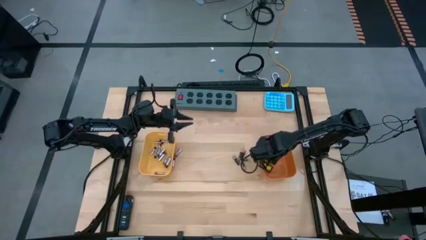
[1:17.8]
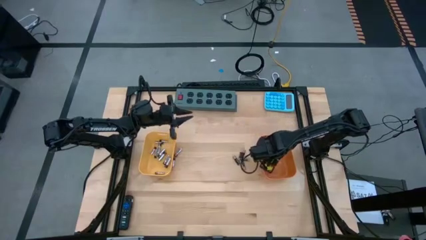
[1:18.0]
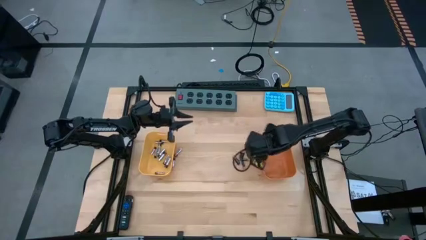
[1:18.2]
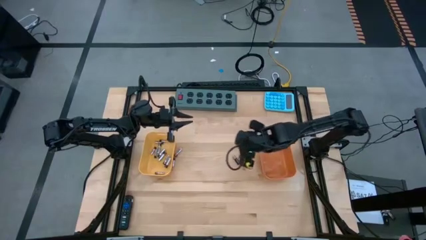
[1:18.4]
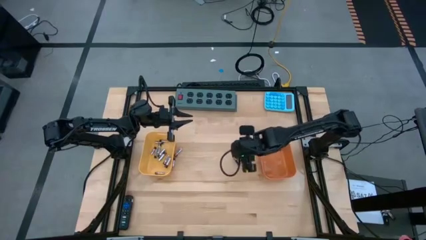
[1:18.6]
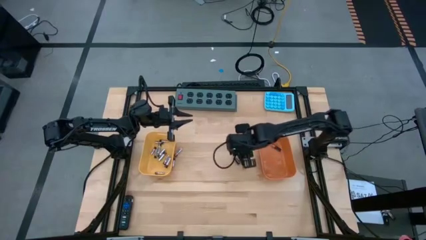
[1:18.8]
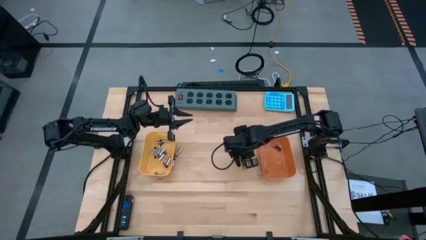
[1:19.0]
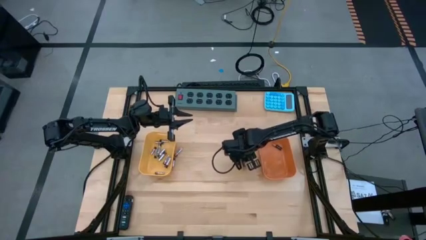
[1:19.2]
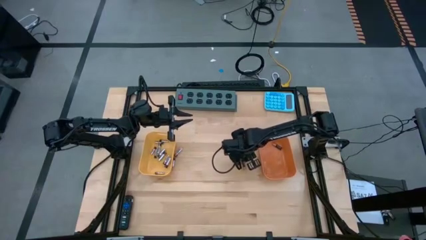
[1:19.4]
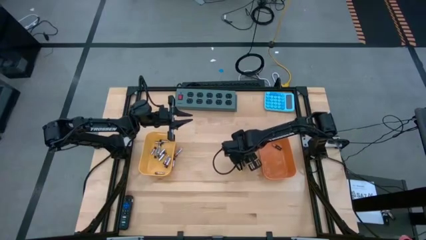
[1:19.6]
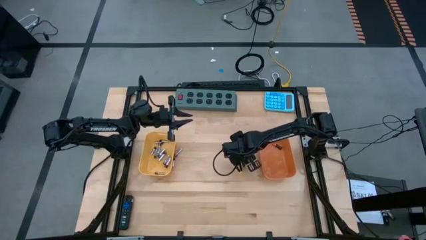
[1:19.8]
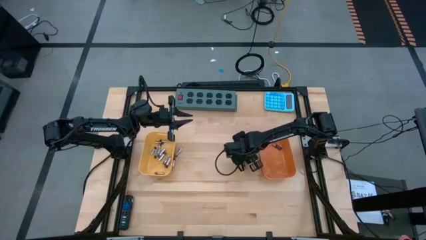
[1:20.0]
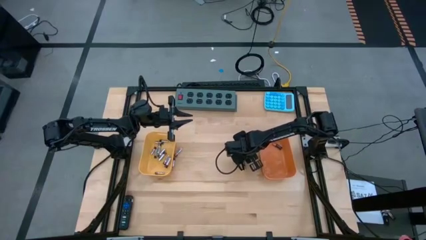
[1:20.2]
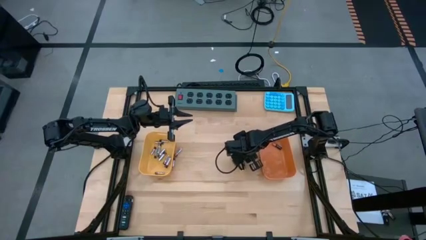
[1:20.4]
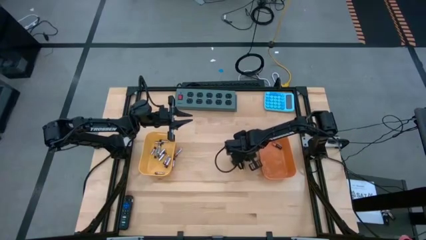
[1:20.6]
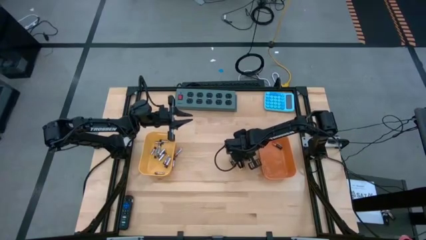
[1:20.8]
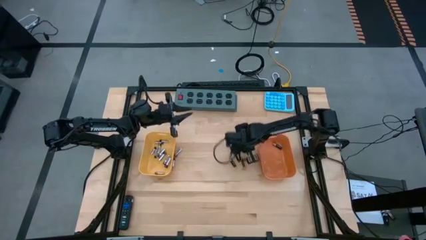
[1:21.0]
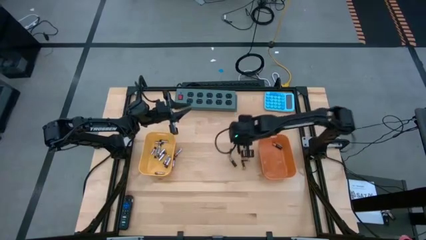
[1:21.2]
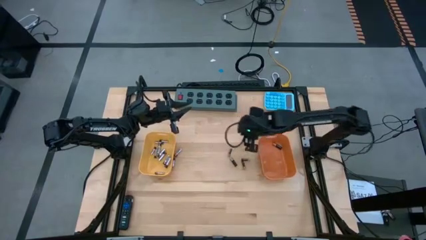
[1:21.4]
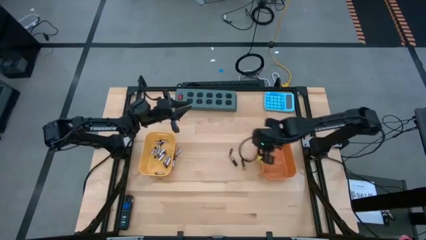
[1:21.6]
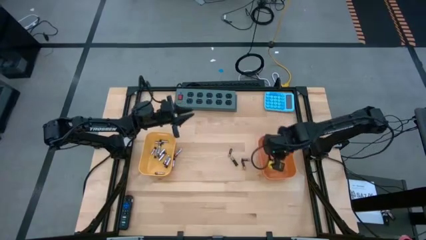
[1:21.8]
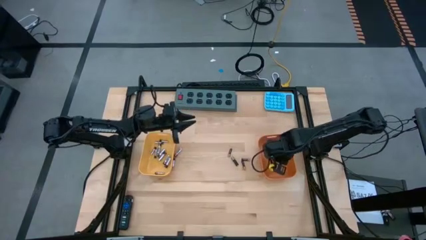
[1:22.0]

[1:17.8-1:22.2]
Task: Sort batteries
Put the black battery into the orange bin

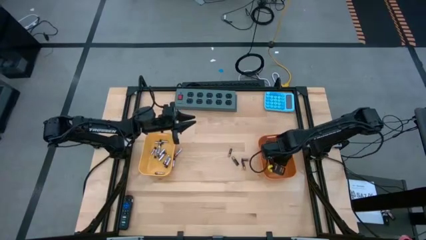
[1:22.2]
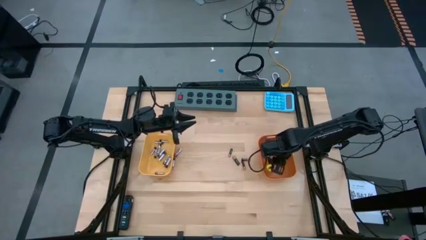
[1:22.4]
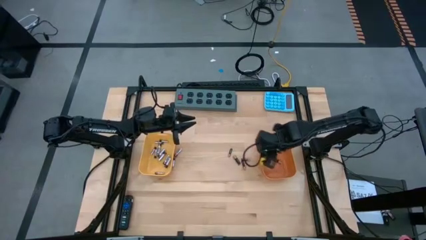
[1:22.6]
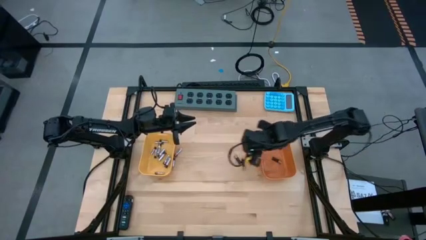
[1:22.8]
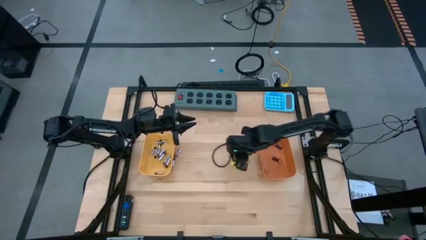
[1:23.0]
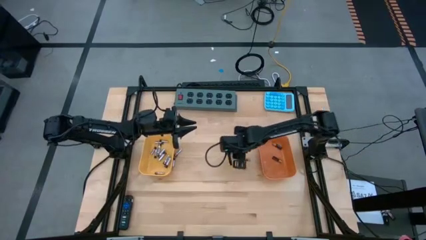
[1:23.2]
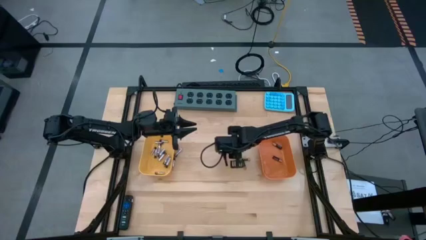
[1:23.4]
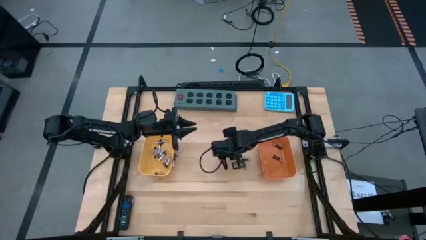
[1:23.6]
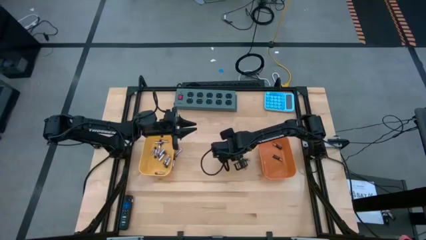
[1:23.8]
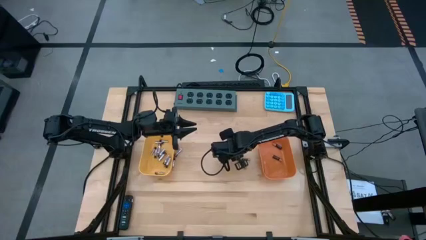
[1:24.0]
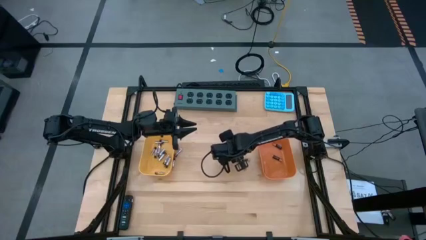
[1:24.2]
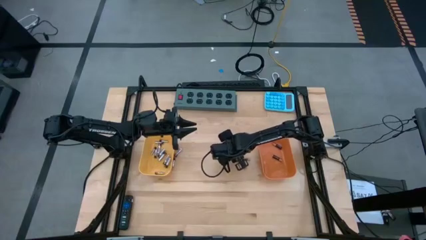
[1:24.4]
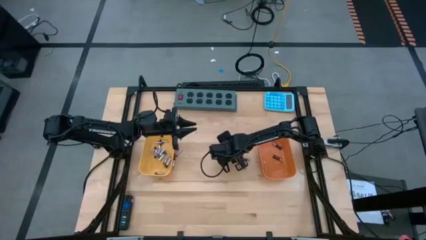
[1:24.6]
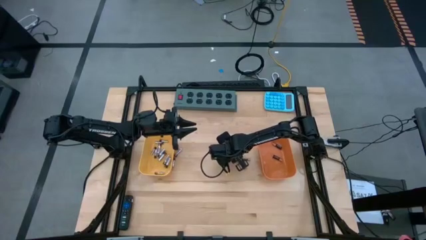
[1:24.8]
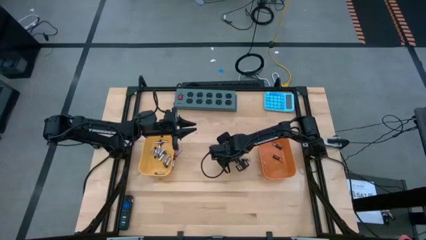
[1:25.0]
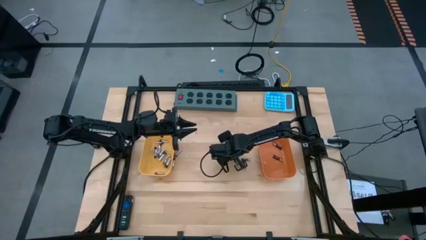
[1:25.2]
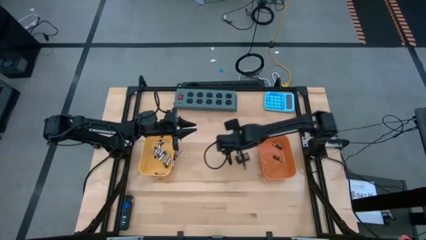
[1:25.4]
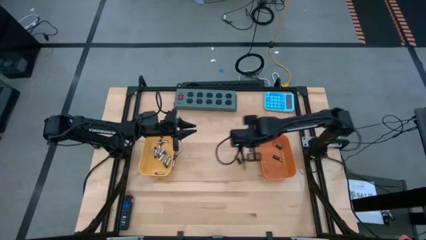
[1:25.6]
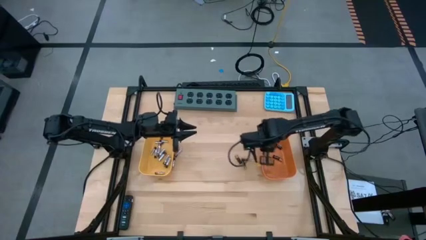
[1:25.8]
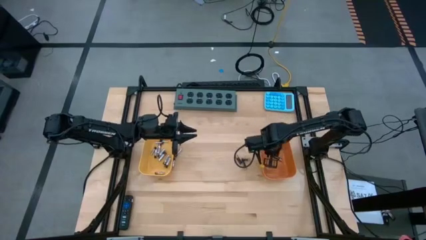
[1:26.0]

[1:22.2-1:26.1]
Put the black battery into the orange bin

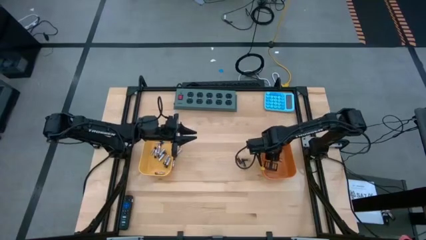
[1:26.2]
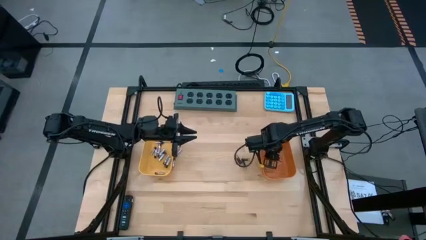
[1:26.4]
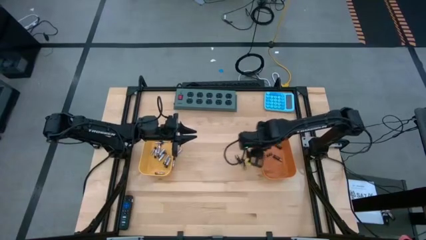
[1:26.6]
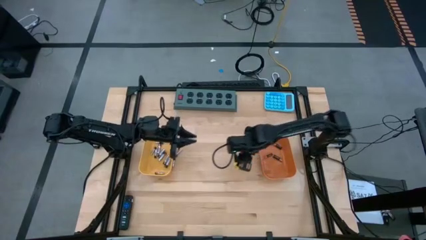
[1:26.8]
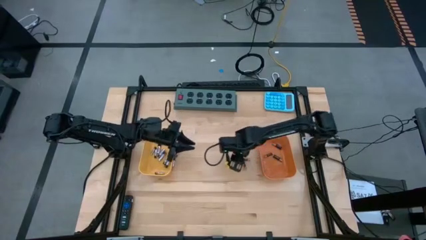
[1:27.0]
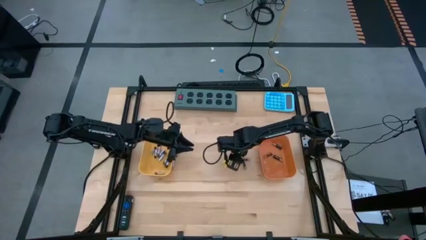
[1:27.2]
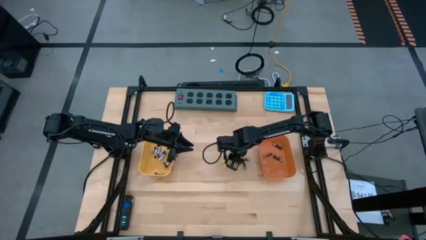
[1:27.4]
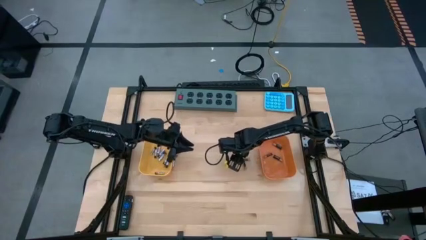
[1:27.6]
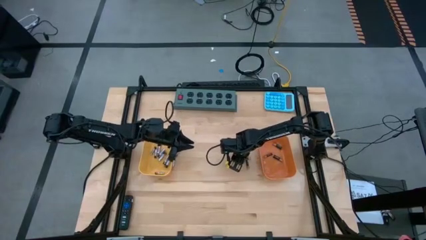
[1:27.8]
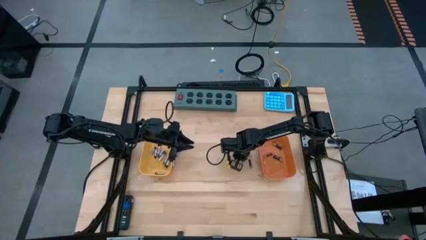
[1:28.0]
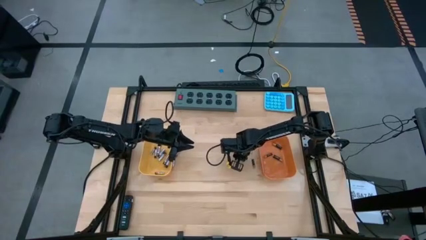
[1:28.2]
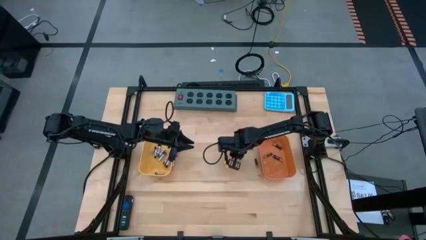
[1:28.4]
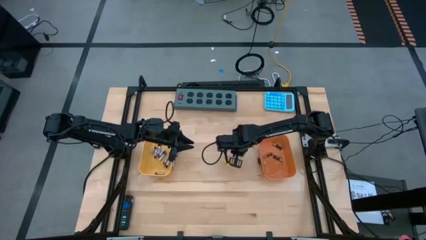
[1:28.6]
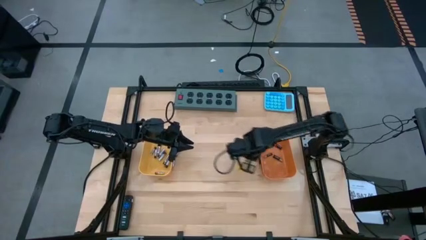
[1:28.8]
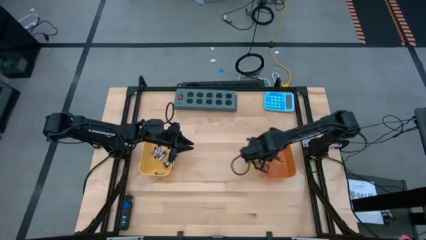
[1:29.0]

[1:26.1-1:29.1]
Put the black battery into the orange bin

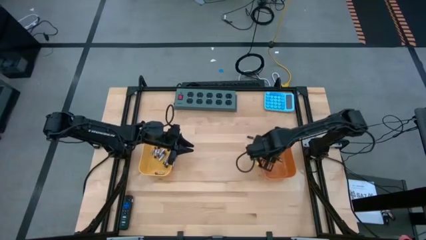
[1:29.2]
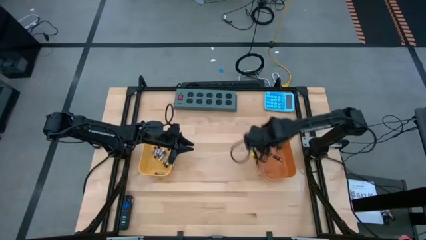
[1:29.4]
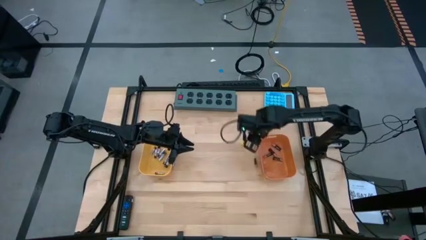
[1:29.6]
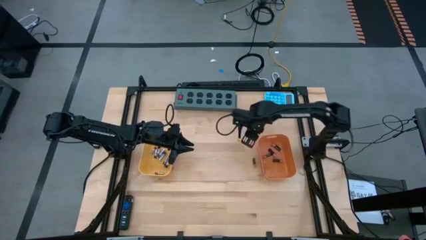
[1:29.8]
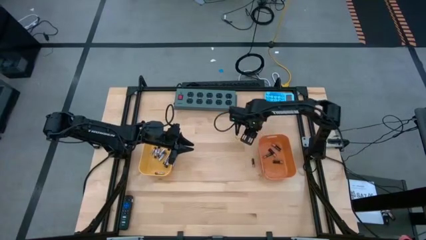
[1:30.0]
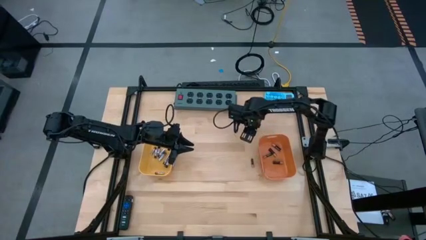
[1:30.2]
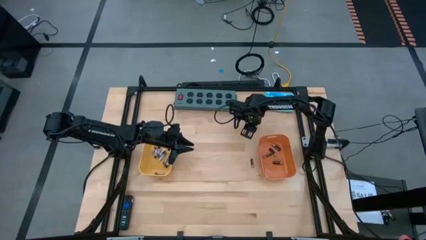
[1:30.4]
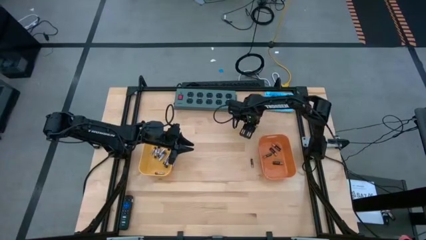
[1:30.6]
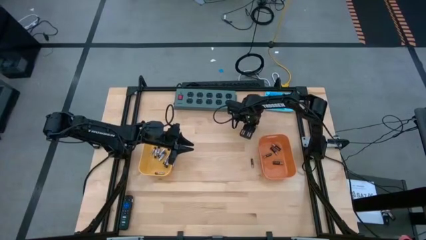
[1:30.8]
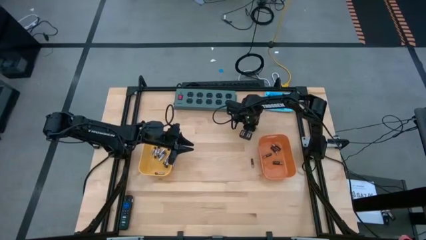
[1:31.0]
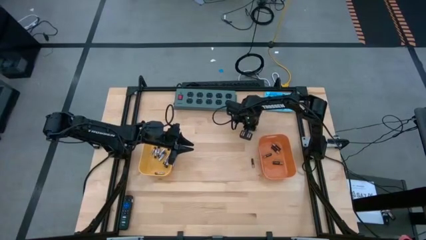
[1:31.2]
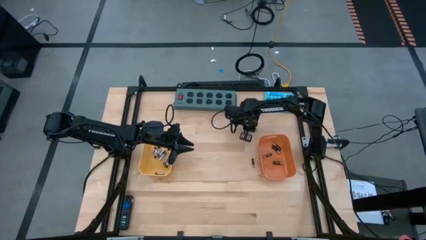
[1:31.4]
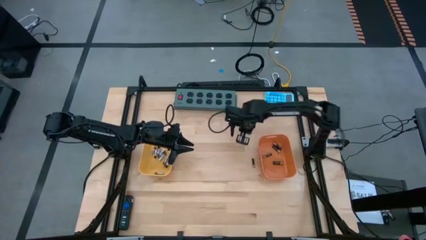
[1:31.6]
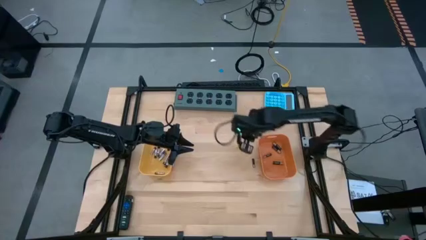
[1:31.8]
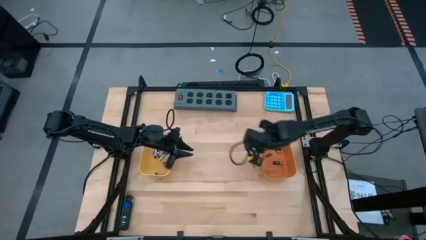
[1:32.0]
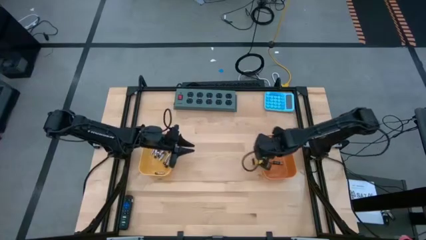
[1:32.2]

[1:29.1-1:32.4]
Put the black battery into the orange bin

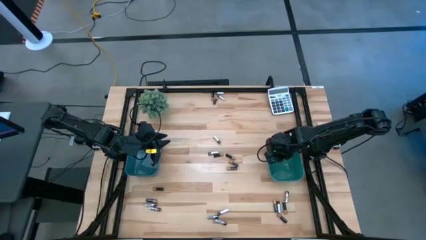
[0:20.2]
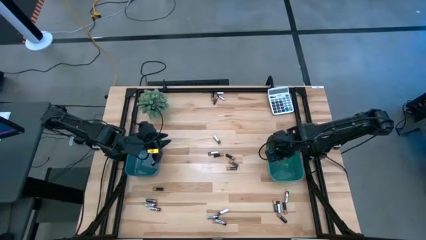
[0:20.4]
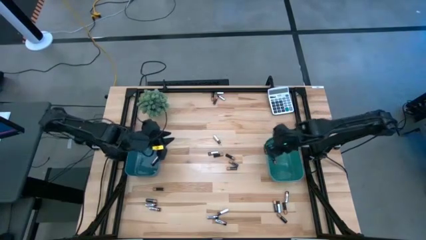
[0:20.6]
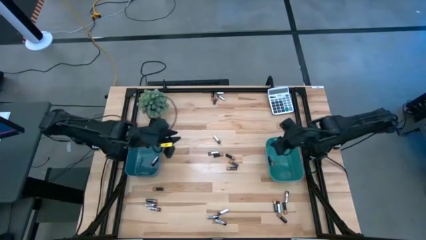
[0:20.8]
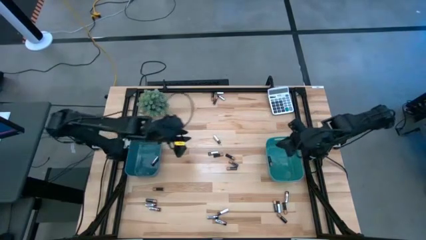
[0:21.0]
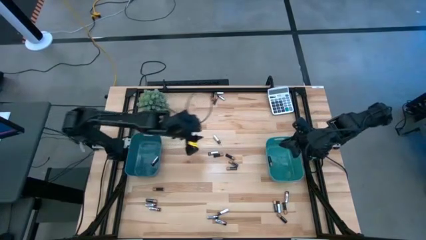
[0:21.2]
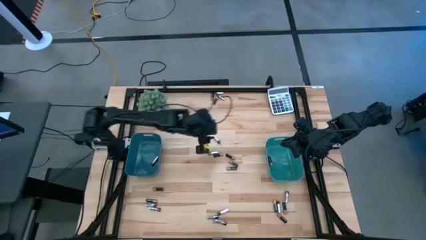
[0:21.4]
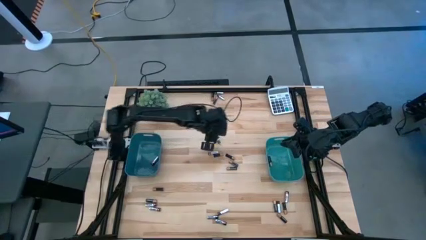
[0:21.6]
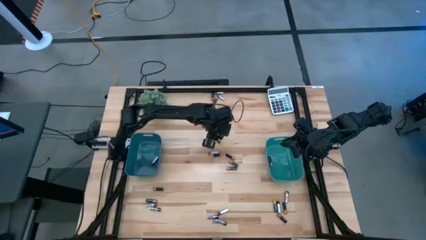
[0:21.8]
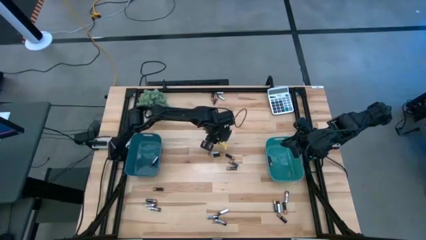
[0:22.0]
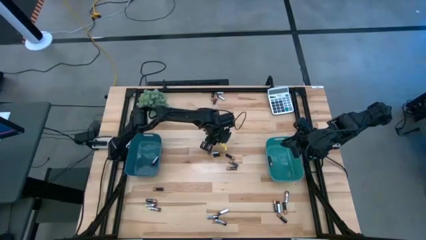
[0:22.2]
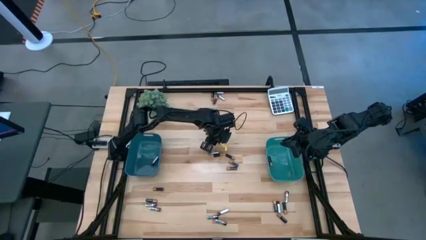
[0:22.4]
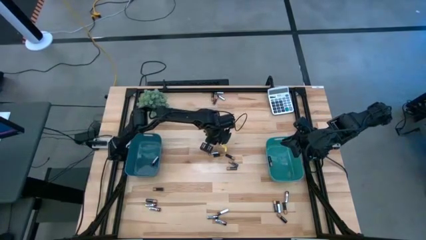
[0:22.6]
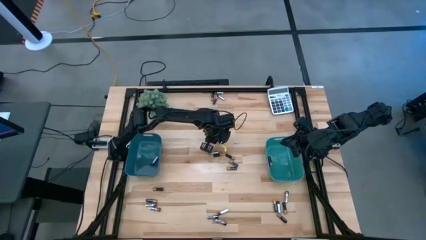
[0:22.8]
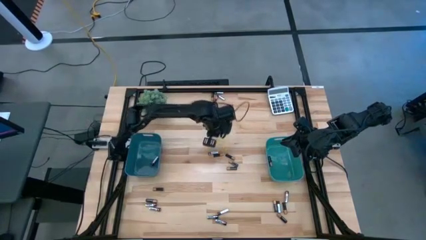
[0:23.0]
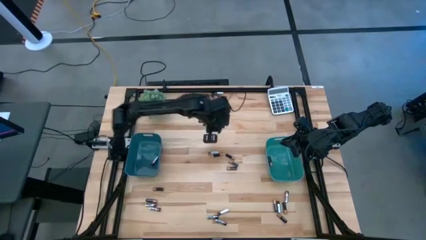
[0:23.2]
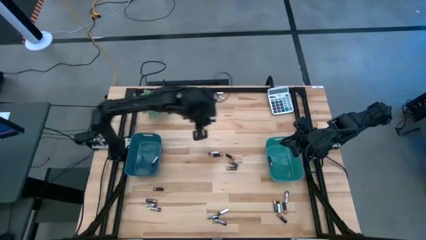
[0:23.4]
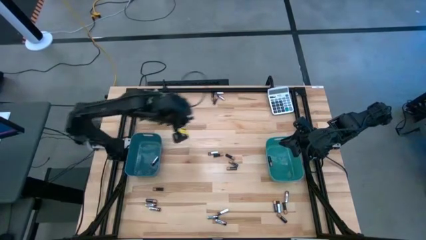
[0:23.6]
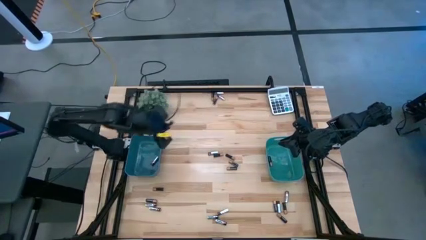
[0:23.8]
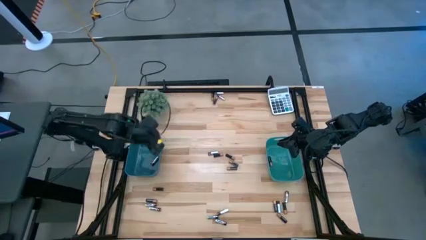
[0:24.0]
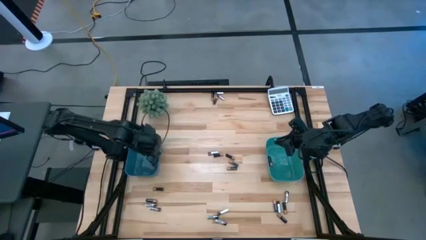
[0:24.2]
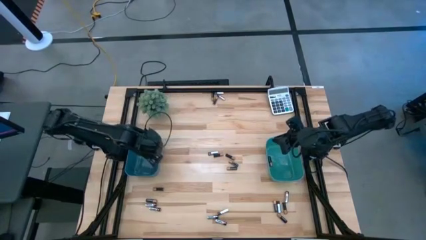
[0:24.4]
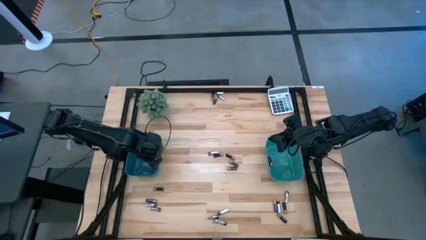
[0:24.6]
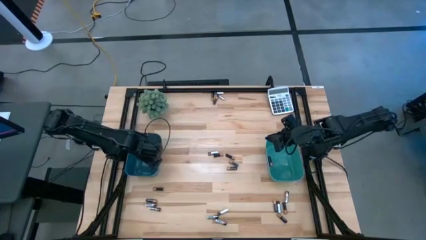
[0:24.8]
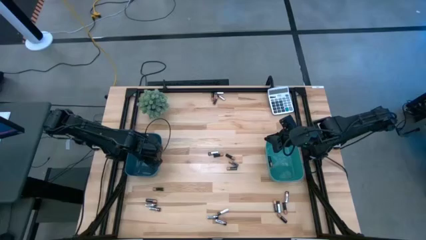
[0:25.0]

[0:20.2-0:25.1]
Task: Sort batteries
Put the silver battery into the blue bin
